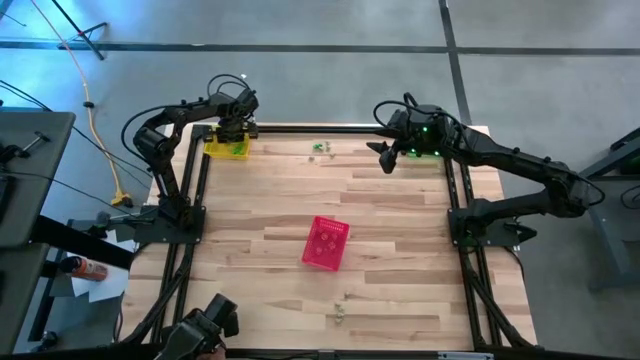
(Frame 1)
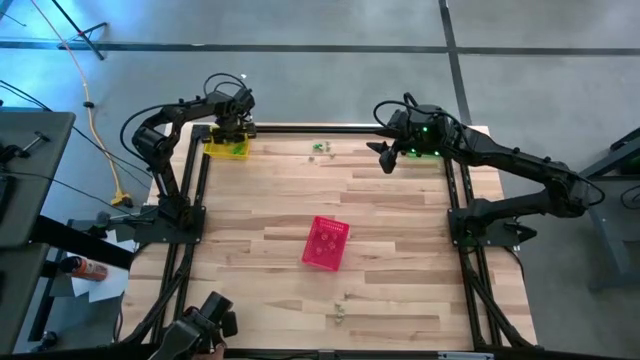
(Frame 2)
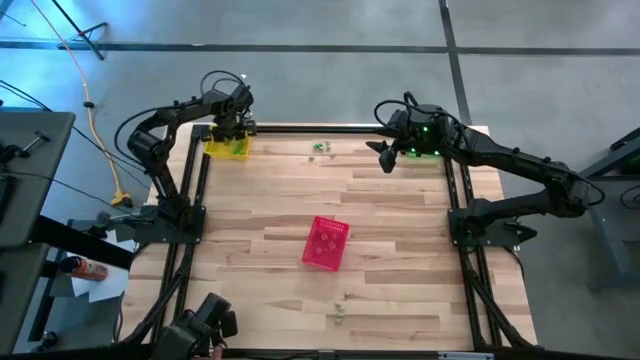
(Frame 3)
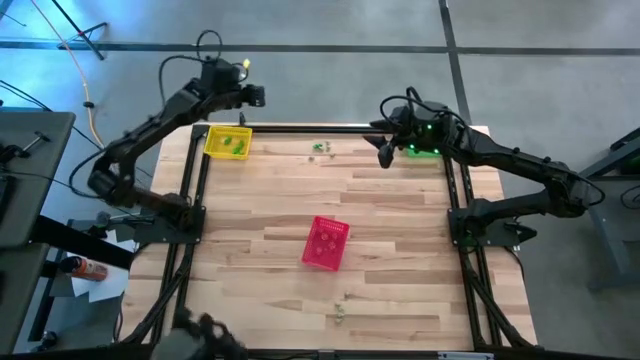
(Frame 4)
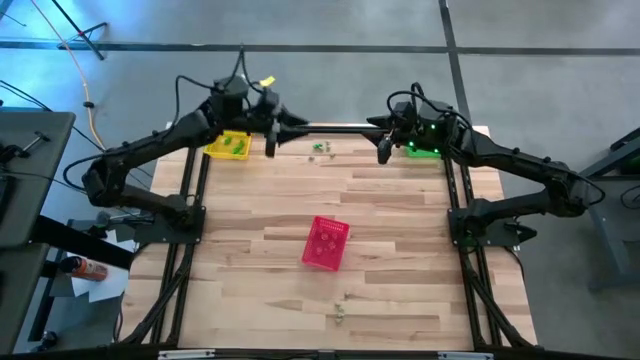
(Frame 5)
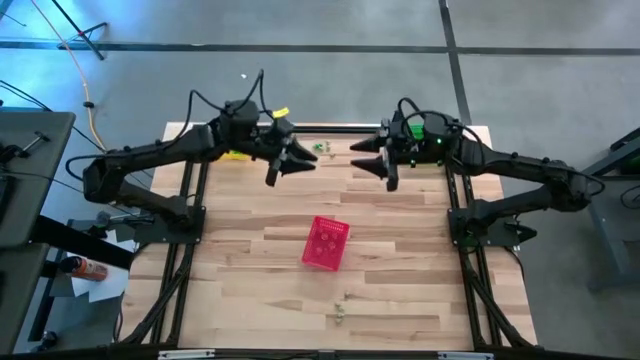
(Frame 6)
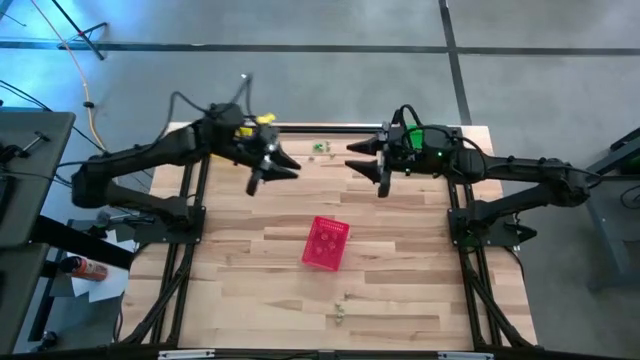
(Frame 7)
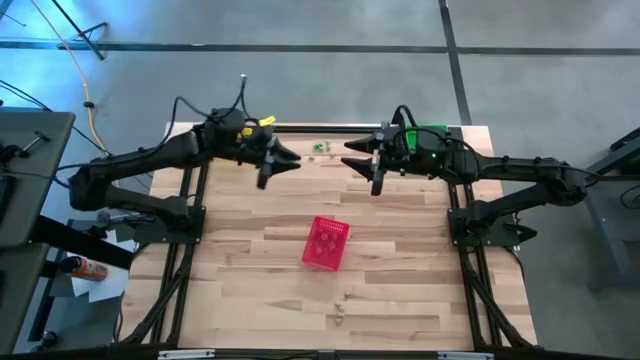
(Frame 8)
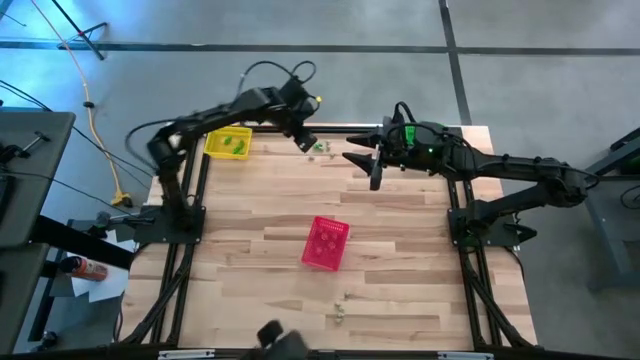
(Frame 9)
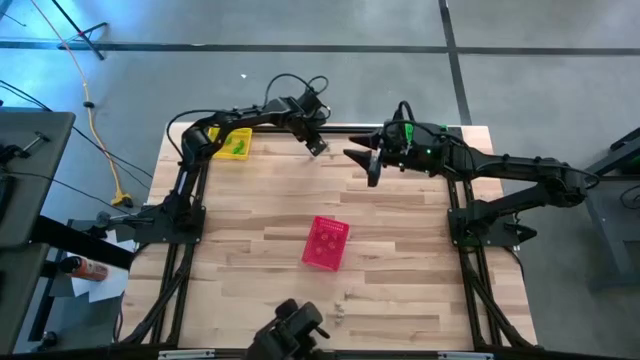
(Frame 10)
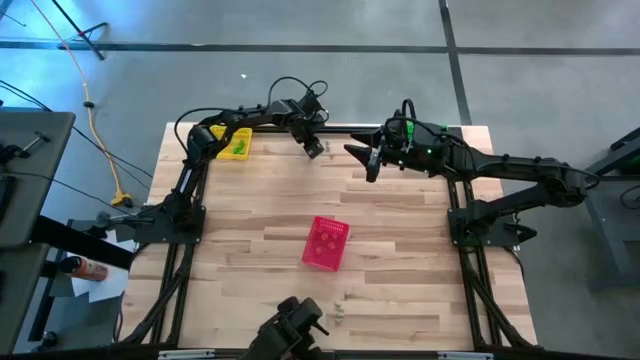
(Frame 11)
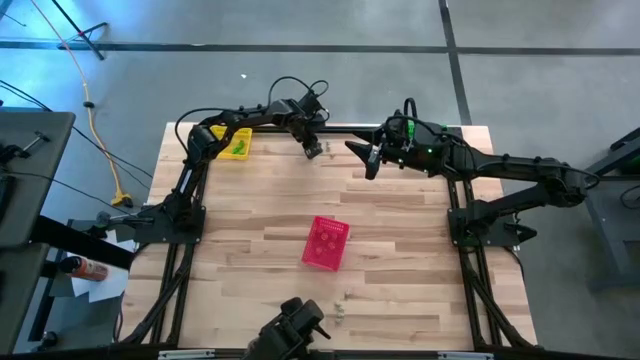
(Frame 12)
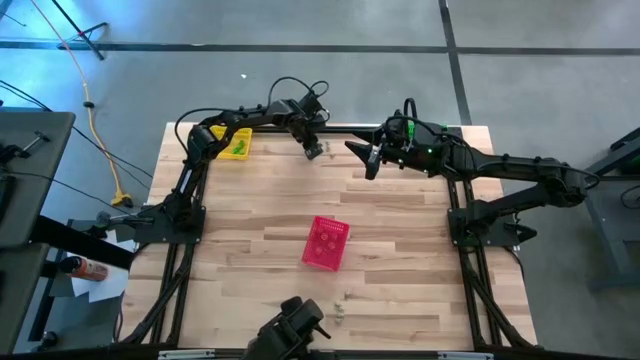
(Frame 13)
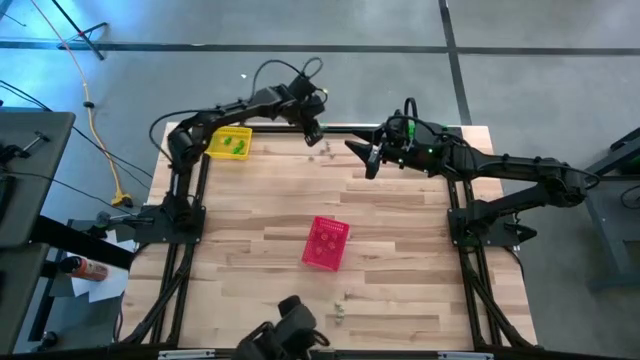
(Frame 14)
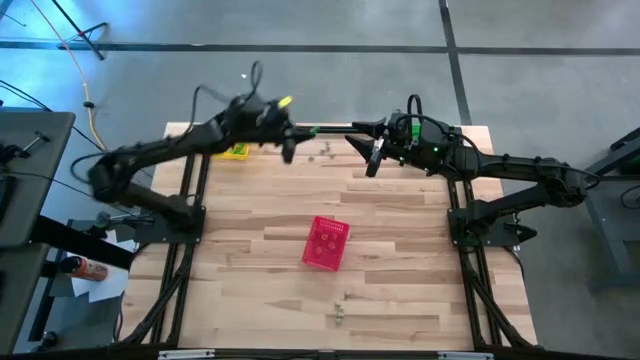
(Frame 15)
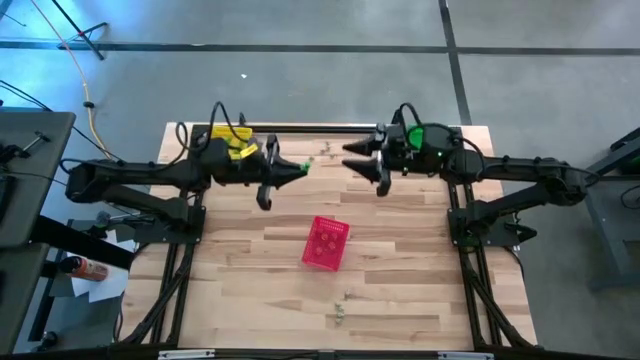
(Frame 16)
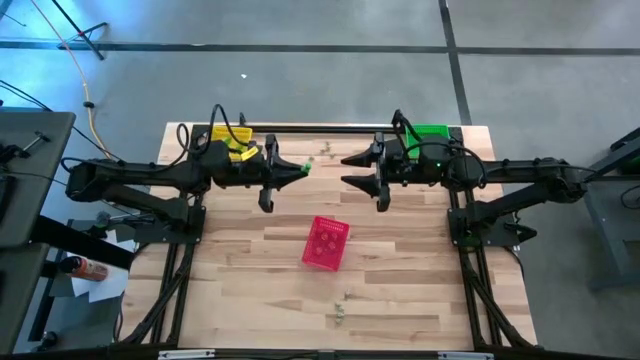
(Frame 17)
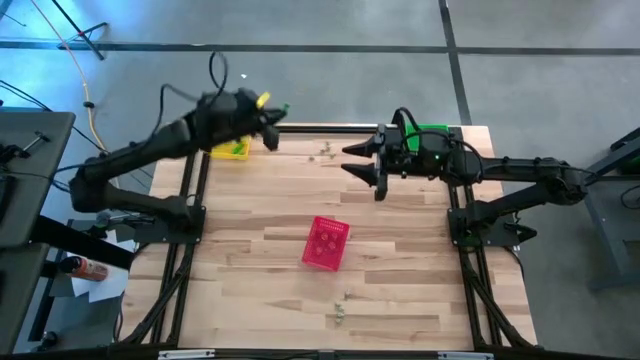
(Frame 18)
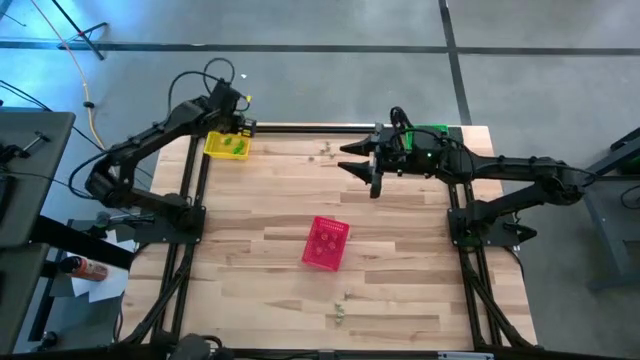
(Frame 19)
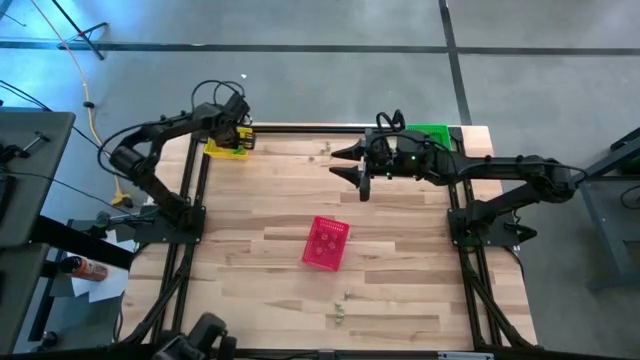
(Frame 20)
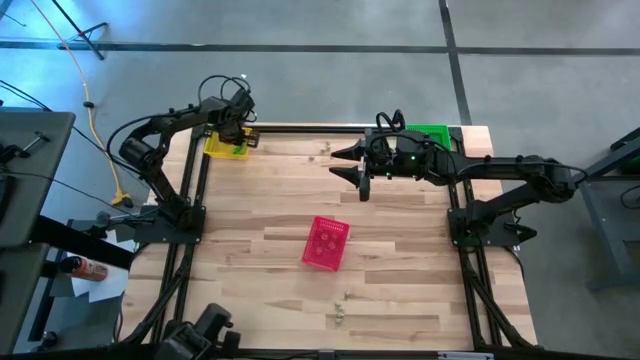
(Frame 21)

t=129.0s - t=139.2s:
Task: Sort Halloween decoration
Put the green skeleton toy into the yellow bin

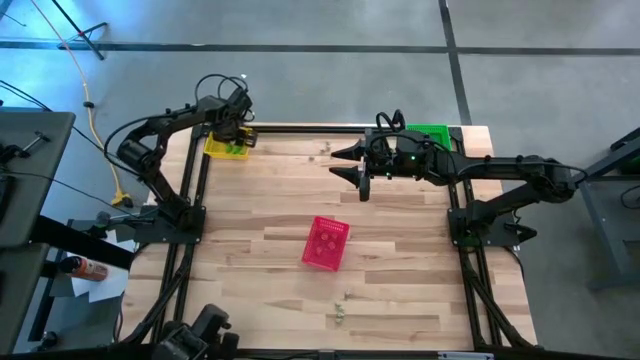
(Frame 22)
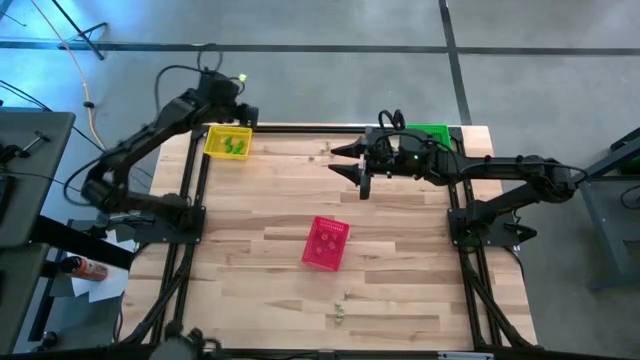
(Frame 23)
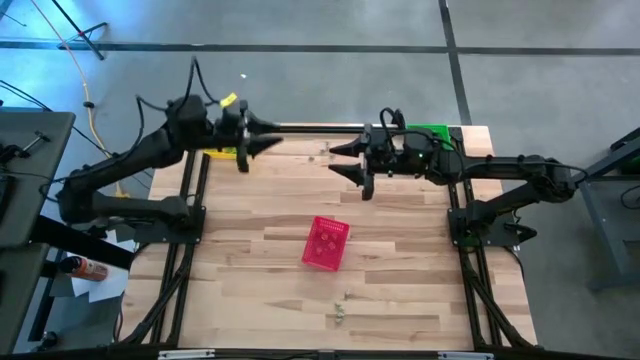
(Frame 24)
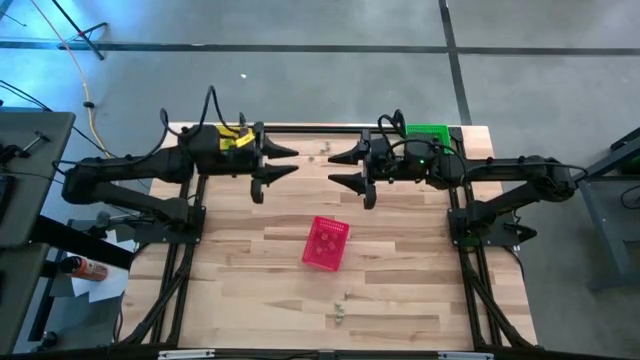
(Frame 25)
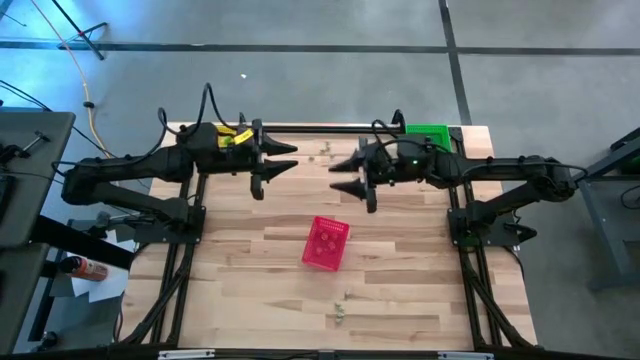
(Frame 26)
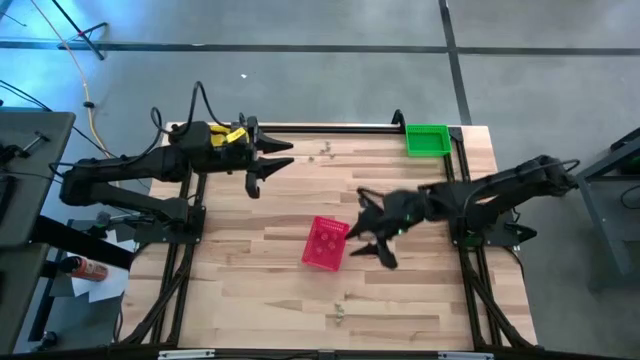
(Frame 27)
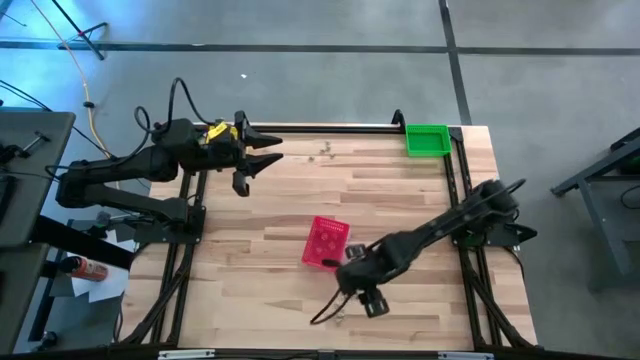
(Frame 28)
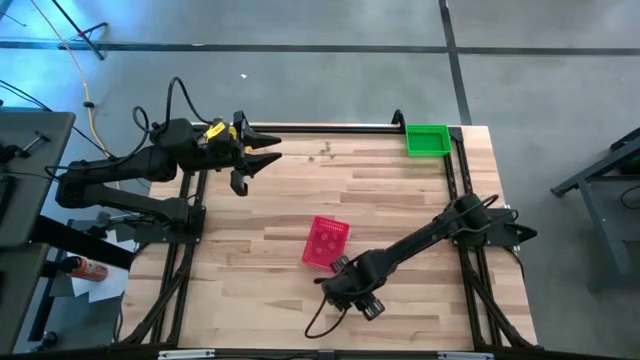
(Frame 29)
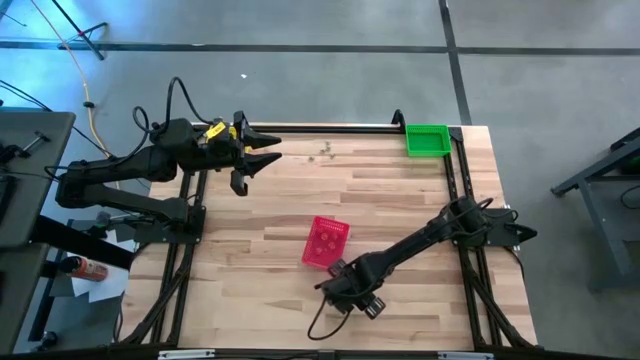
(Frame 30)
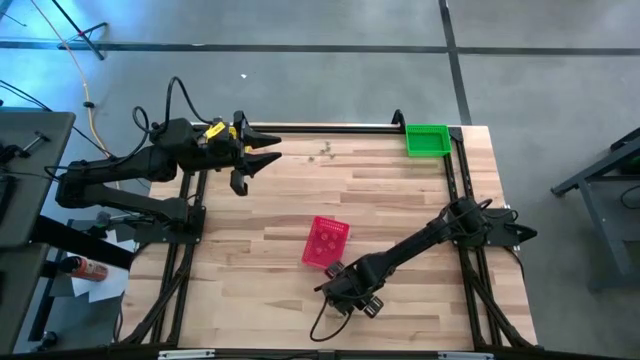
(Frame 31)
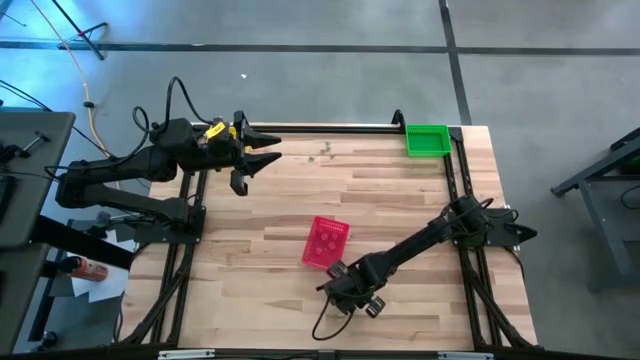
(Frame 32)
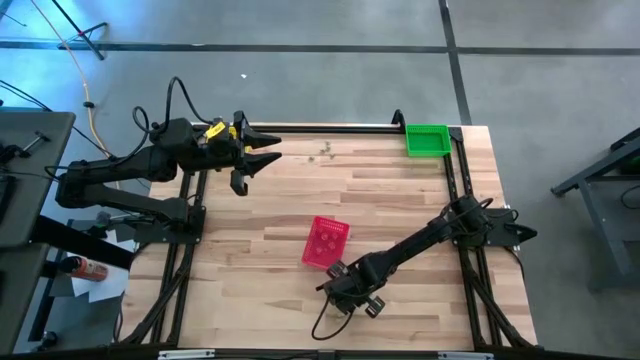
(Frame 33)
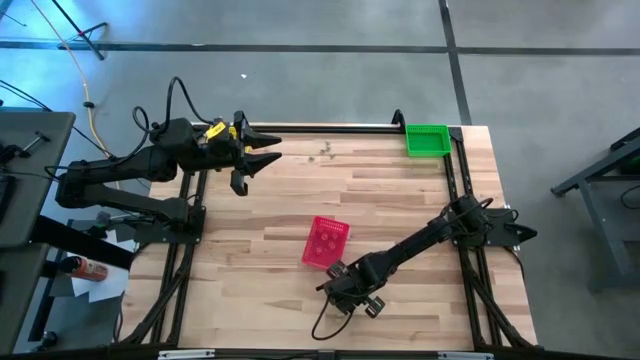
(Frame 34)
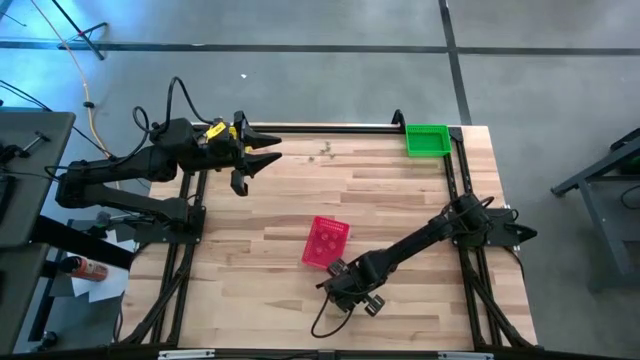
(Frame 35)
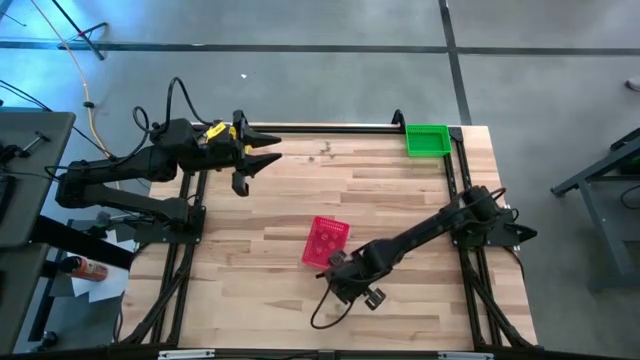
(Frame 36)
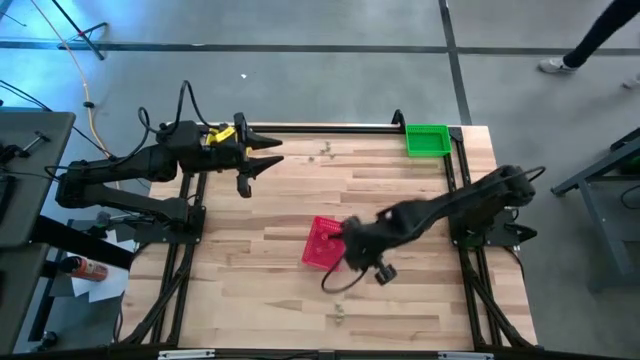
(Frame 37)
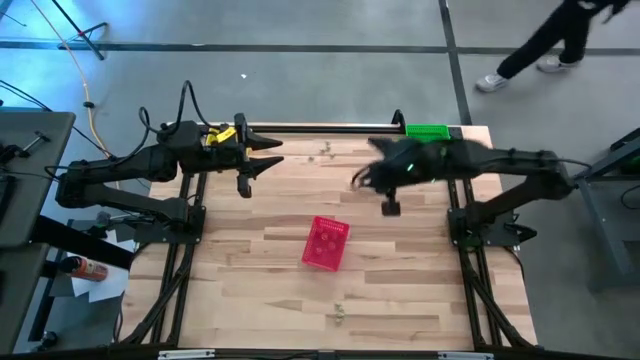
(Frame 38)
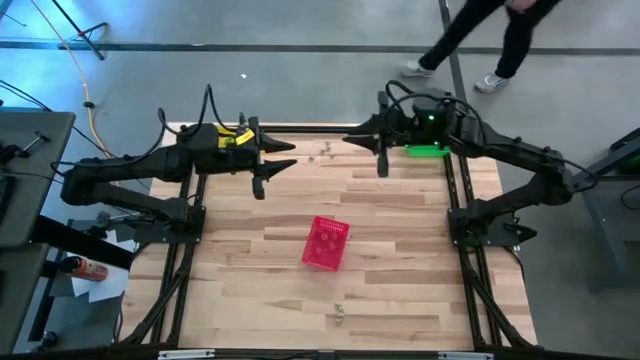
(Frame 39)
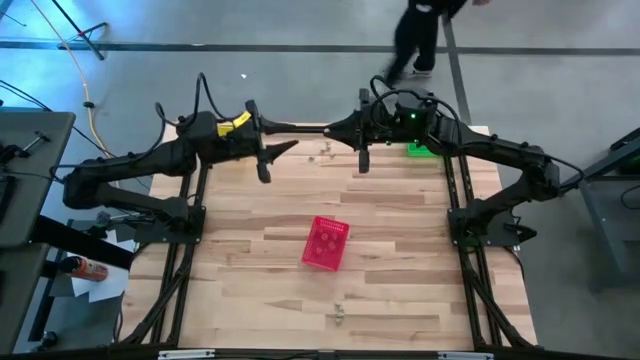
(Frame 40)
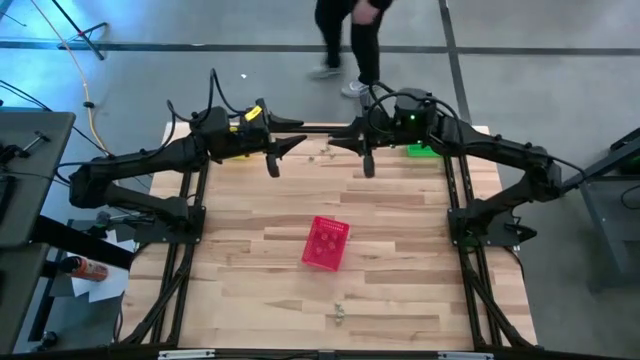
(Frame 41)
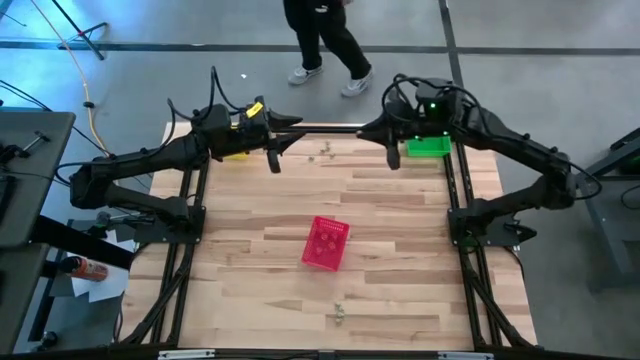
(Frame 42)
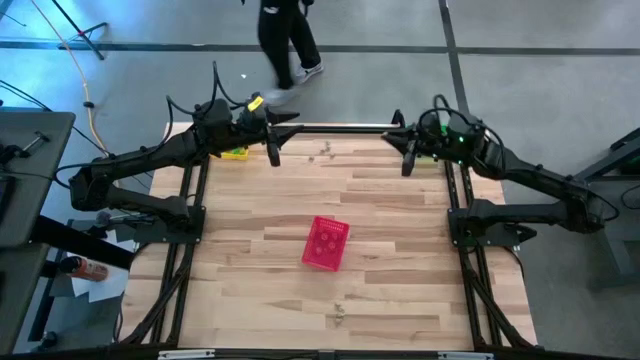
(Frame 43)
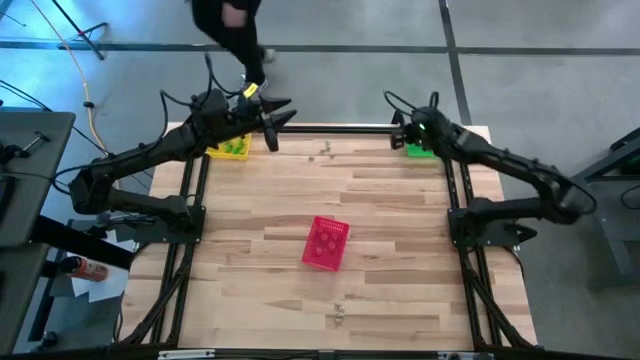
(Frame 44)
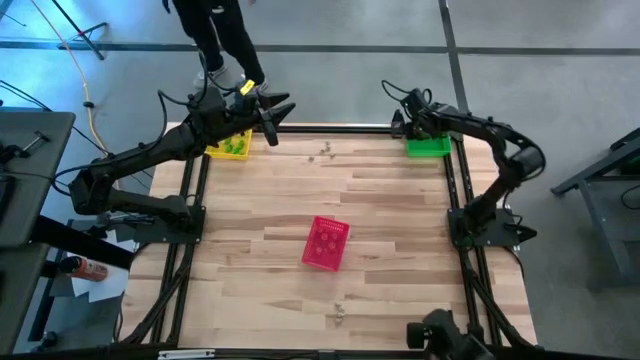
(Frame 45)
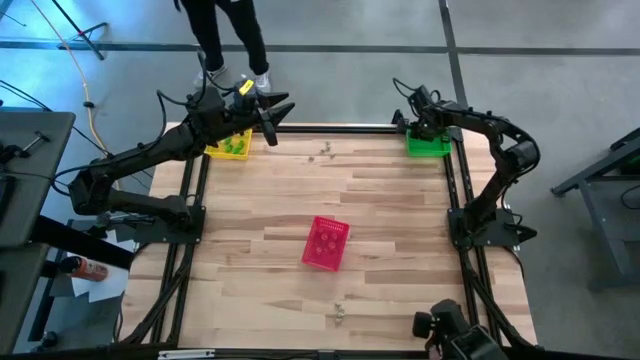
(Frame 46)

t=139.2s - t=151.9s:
Put the white skull toy into the green bin
